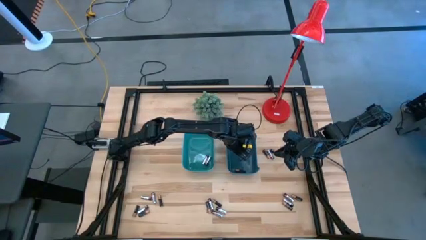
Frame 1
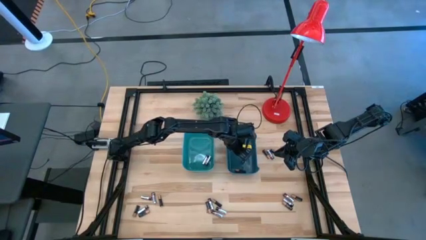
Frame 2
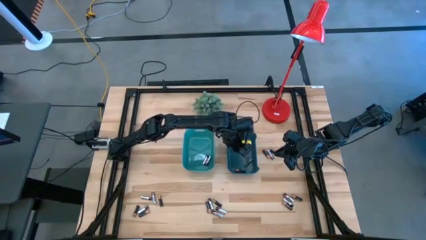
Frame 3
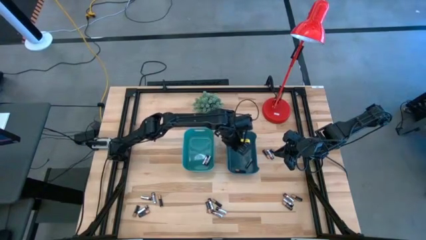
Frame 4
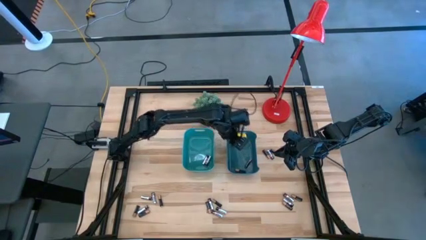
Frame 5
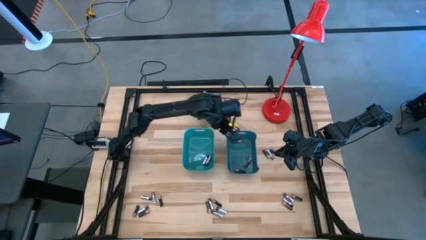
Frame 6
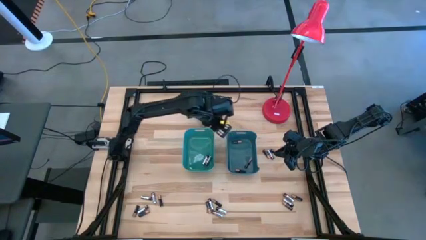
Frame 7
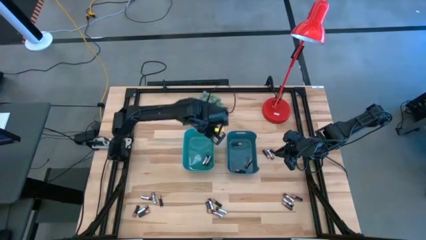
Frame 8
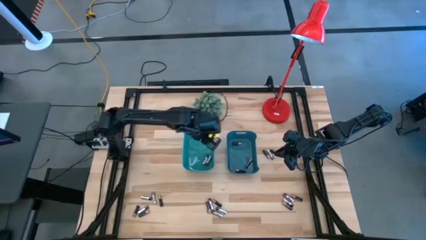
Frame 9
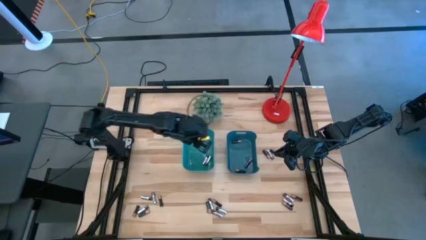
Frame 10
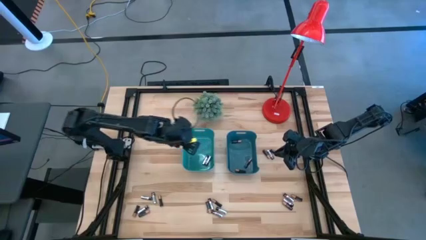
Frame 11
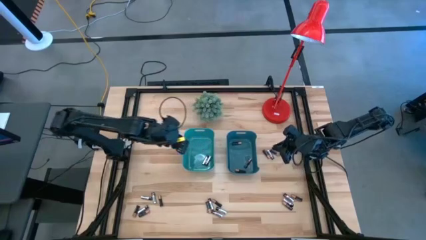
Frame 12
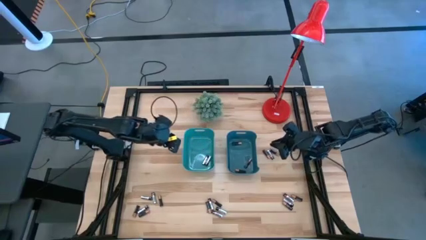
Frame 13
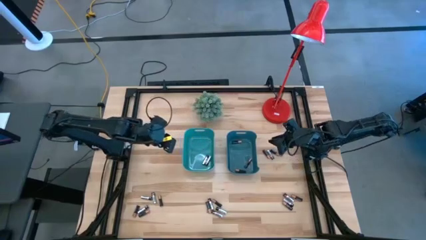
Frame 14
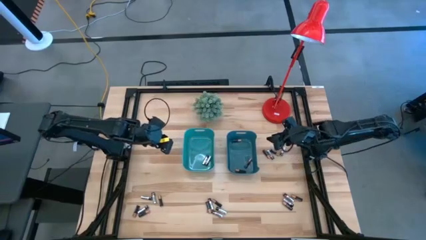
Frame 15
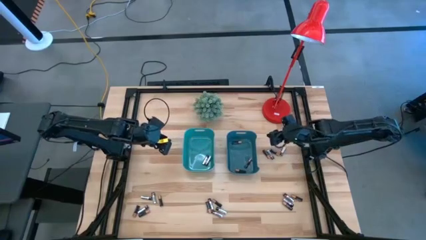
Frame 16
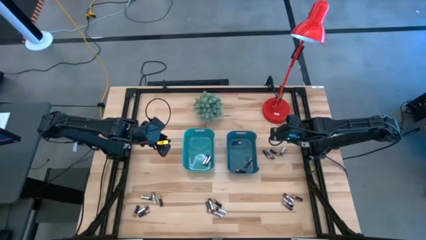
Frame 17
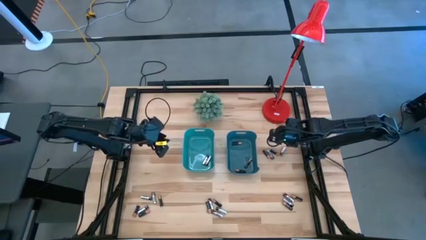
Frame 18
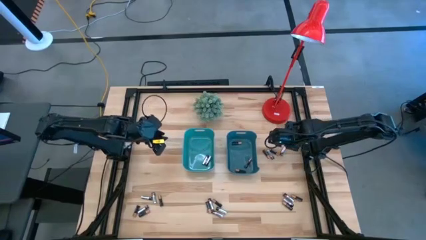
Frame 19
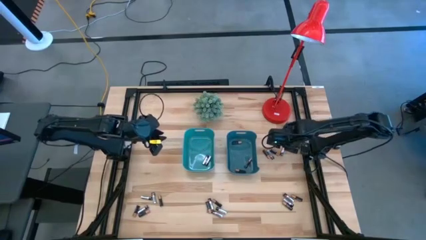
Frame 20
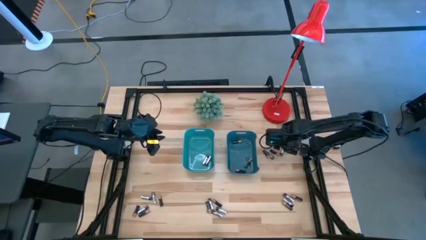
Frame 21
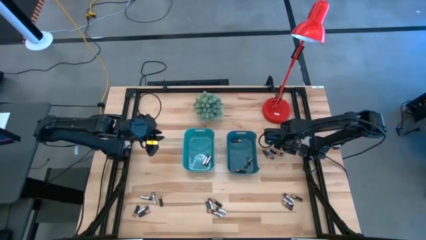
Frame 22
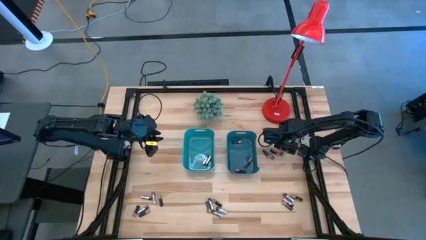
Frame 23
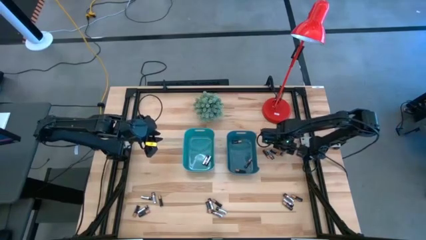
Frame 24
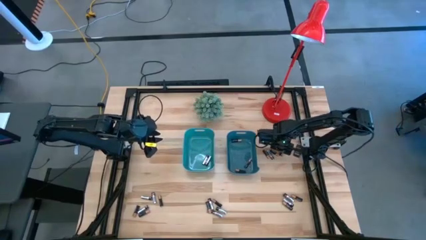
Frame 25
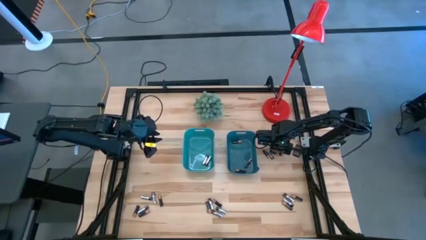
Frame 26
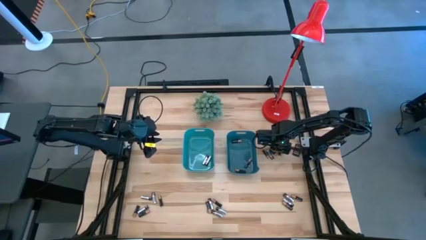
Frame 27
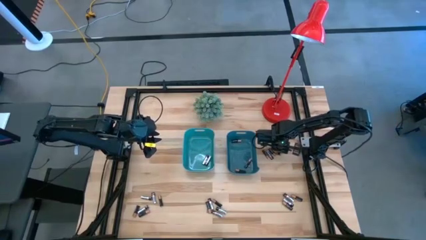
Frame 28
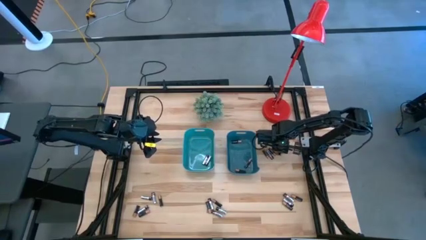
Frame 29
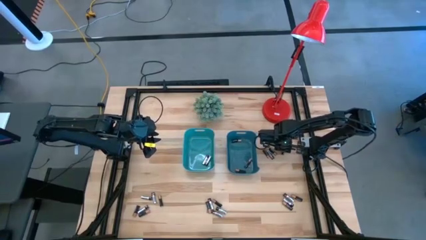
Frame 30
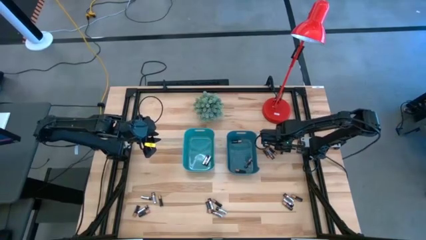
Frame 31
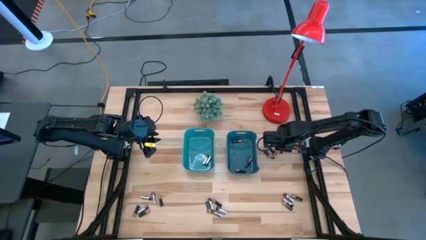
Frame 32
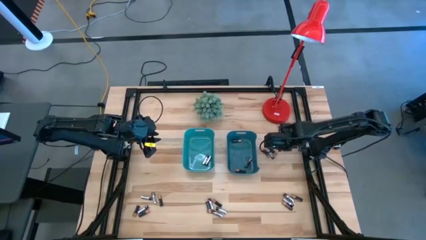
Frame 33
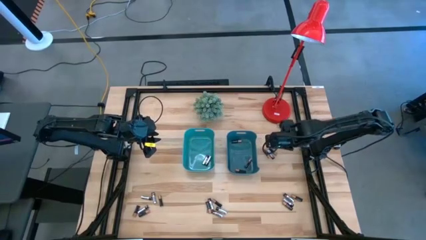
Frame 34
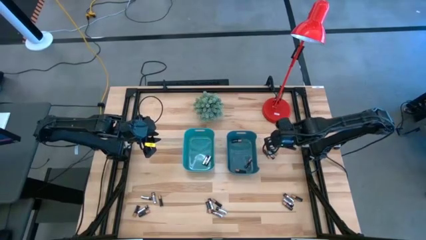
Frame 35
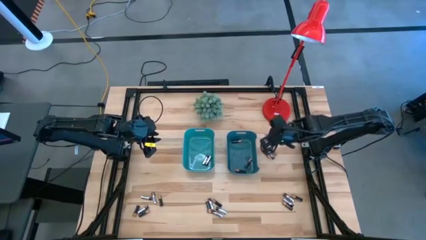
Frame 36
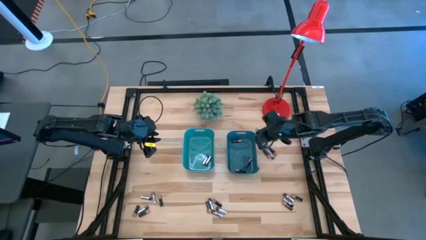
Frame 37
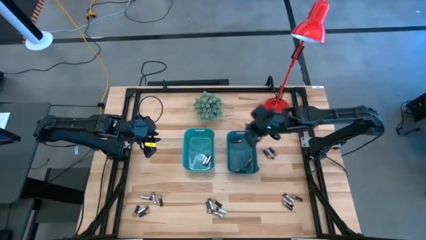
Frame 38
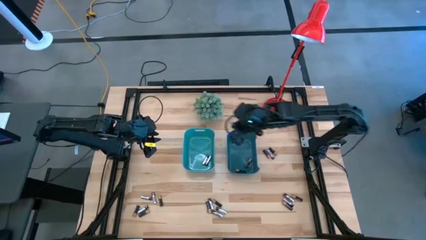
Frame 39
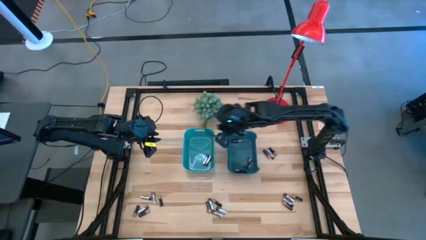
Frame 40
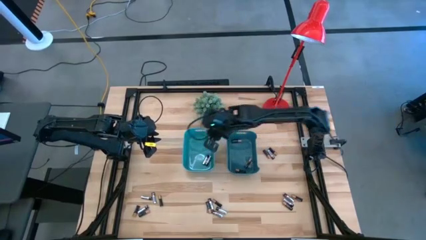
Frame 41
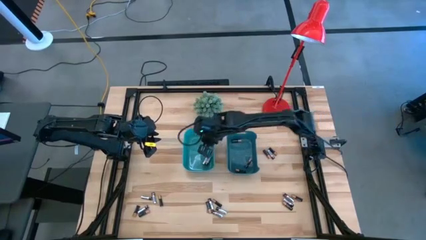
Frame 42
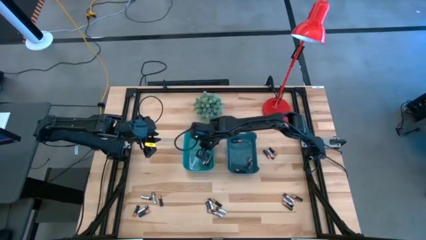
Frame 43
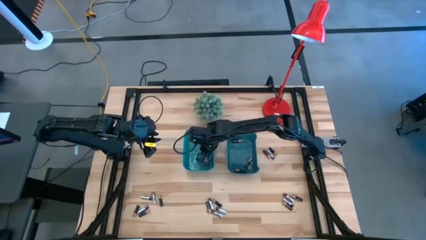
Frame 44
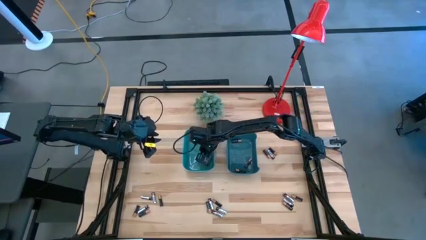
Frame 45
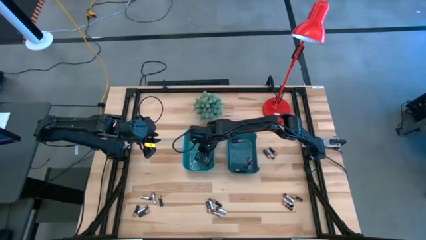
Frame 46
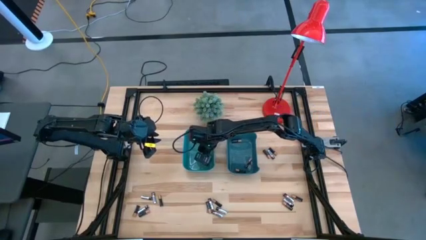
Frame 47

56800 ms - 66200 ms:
Task: Sort batteries
Put the silver battery into the green bin

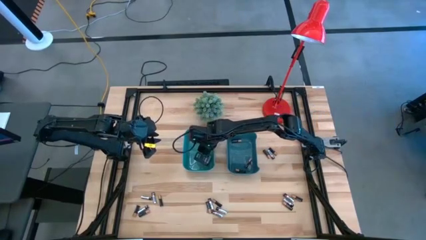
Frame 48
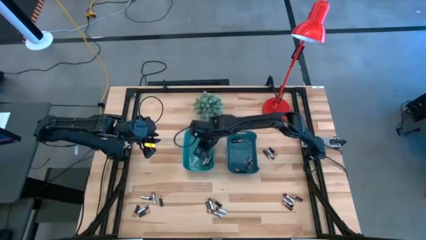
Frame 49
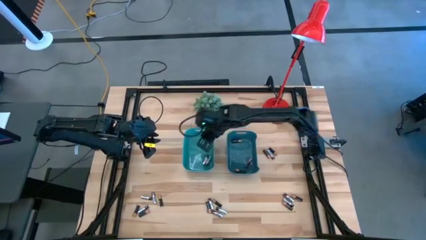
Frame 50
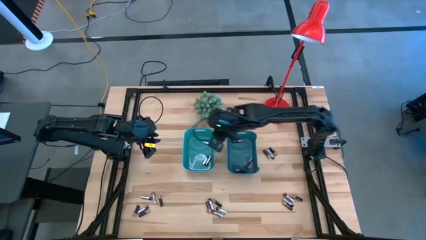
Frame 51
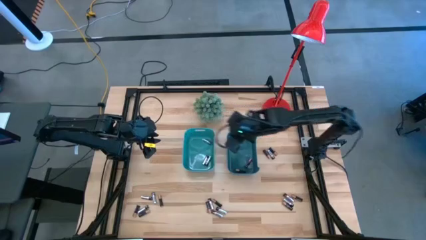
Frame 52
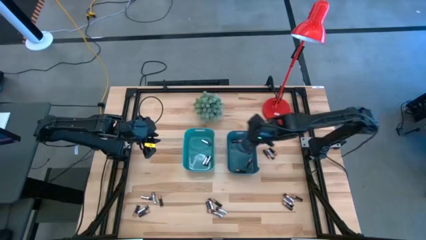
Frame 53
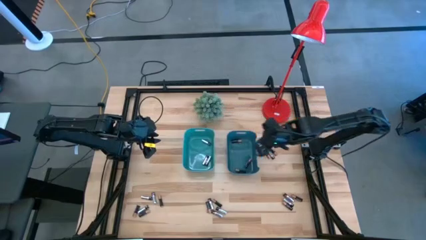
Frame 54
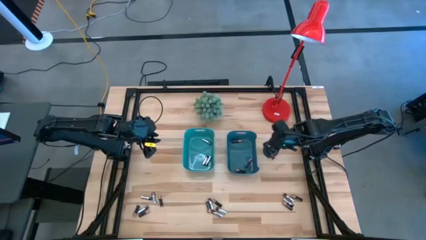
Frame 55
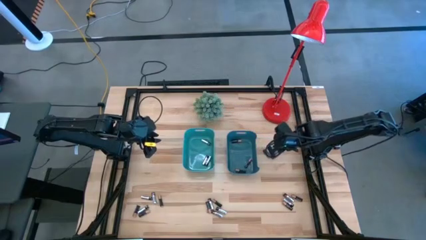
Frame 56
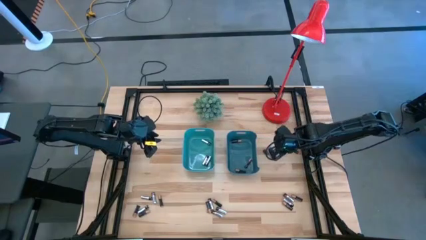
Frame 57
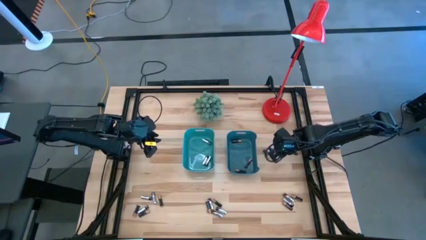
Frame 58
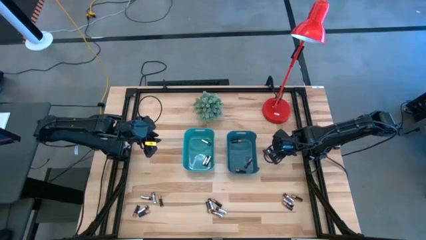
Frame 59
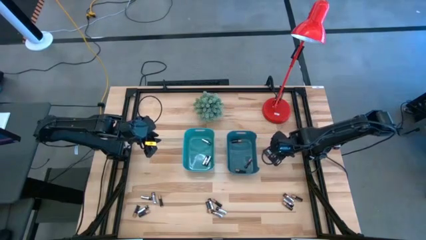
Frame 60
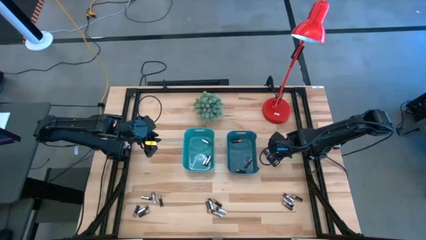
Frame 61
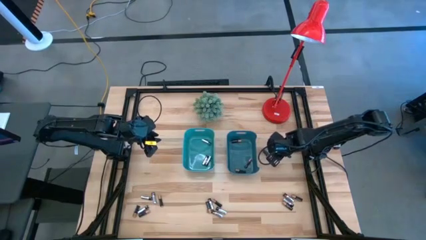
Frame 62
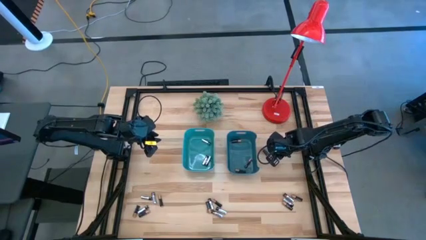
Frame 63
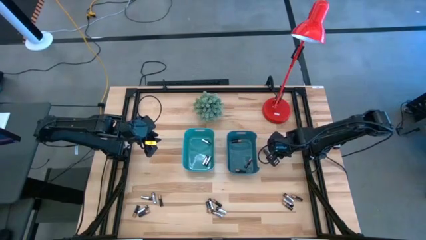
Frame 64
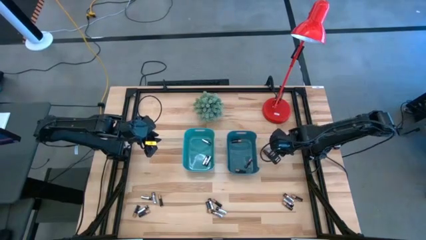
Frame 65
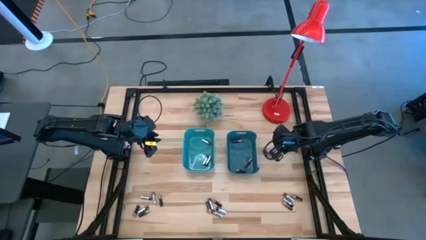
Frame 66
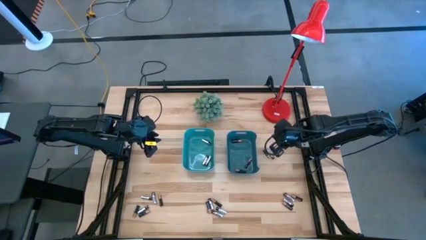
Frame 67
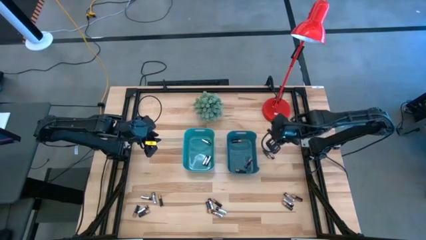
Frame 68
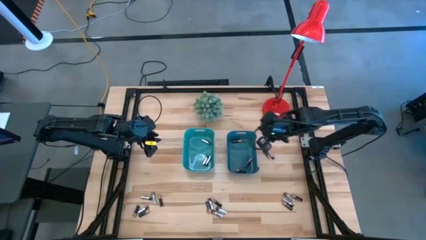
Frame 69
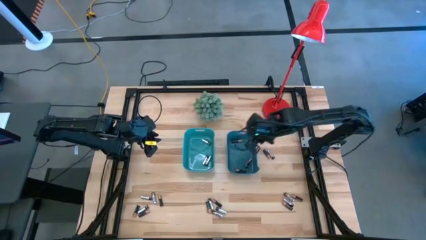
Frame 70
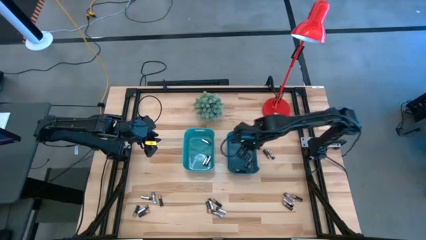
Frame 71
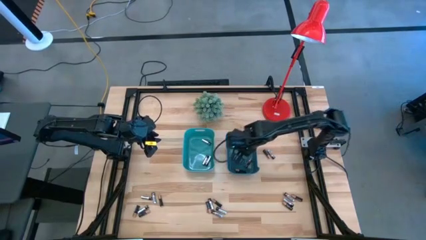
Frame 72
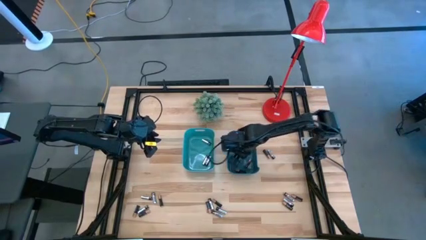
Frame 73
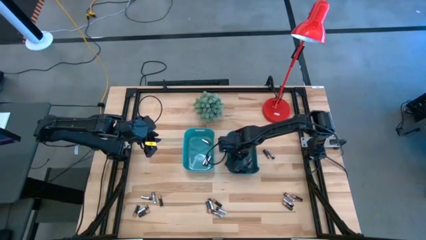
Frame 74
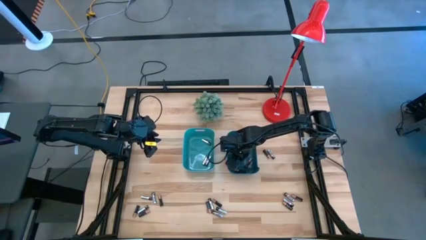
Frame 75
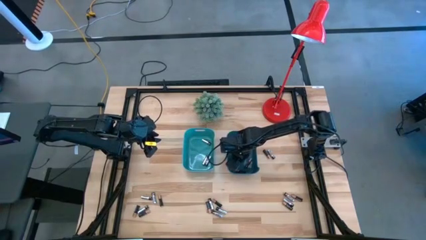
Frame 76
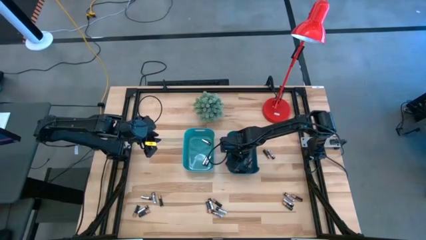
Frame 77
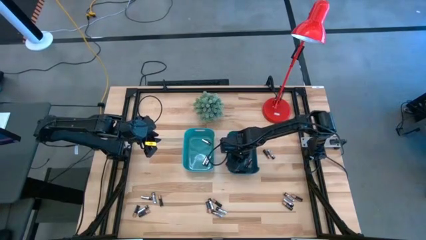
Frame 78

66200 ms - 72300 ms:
Put the black battery into the blue bin

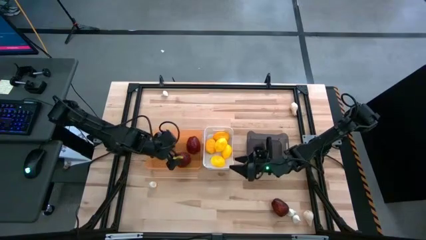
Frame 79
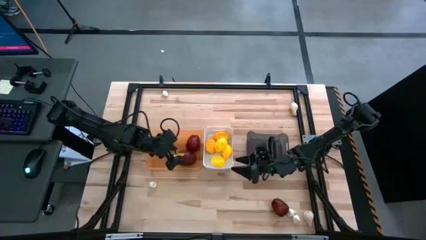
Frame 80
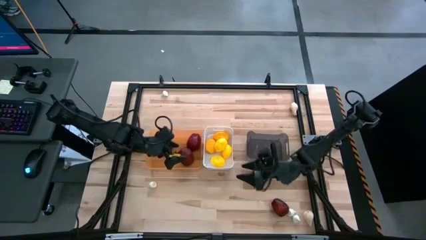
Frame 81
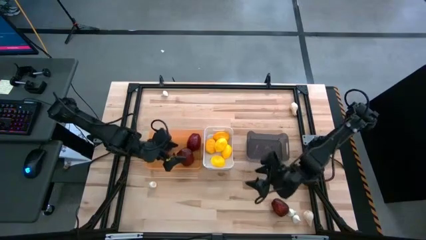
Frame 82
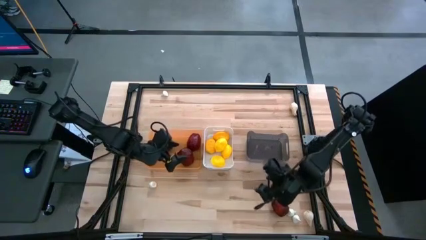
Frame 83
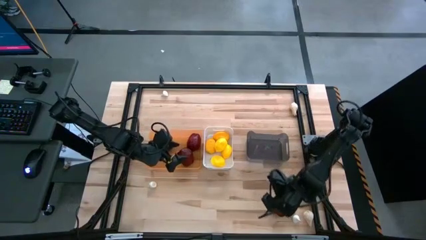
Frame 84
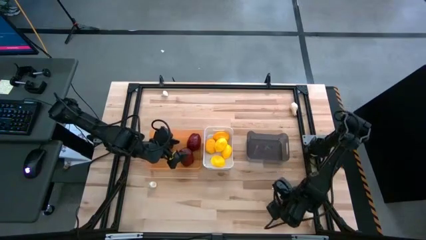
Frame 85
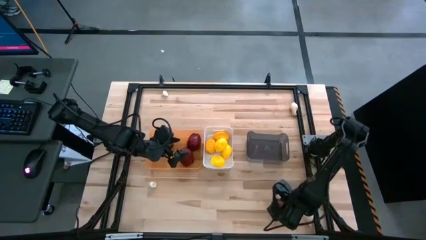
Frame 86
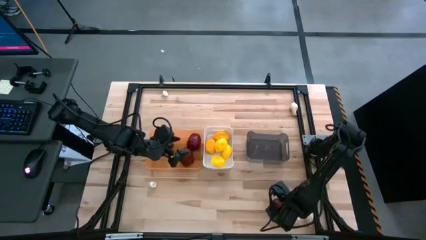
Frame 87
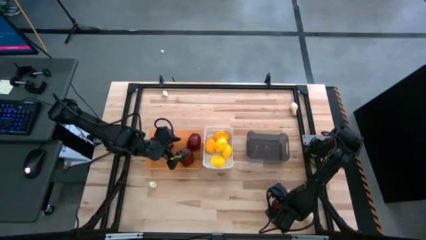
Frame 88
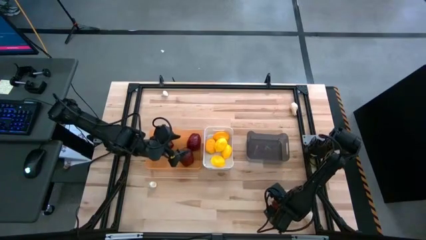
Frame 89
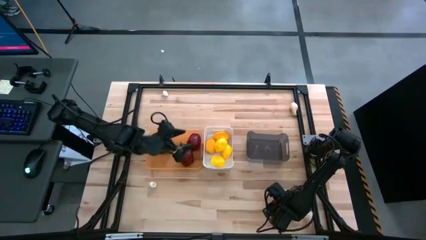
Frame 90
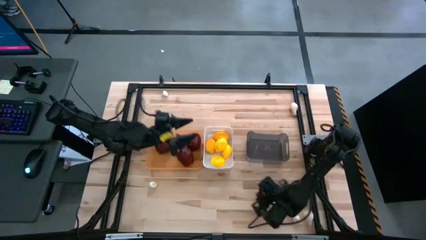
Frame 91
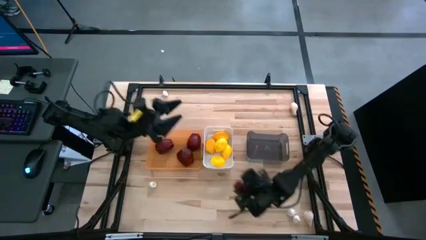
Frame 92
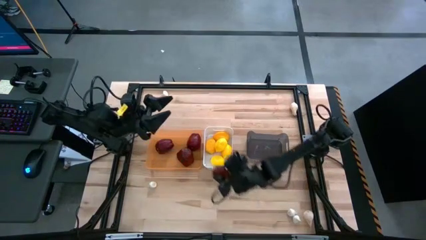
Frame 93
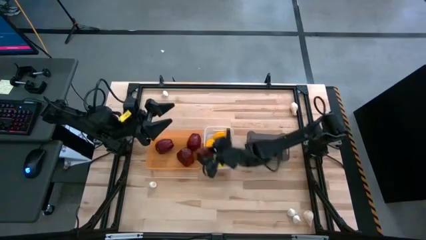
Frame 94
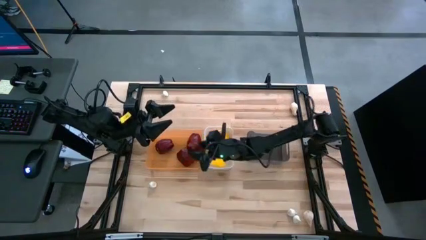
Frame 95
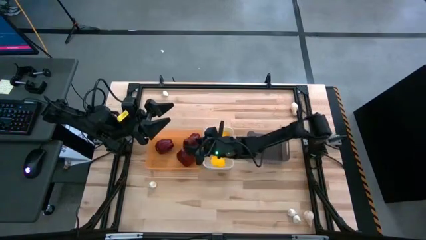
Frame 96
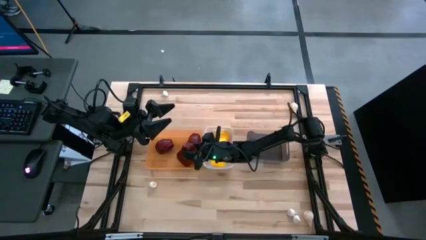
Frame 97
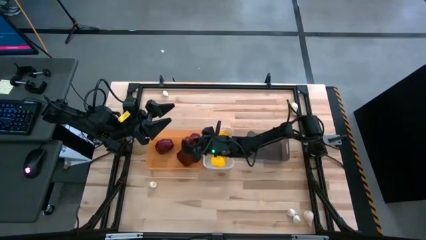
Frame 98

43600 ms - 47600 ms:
Task: Sort produce into baskets
Put the red apple into the orange bin
